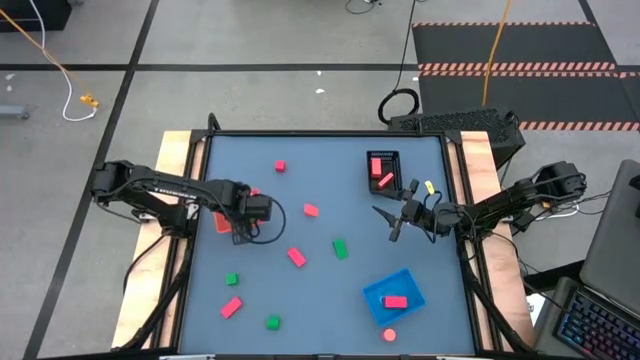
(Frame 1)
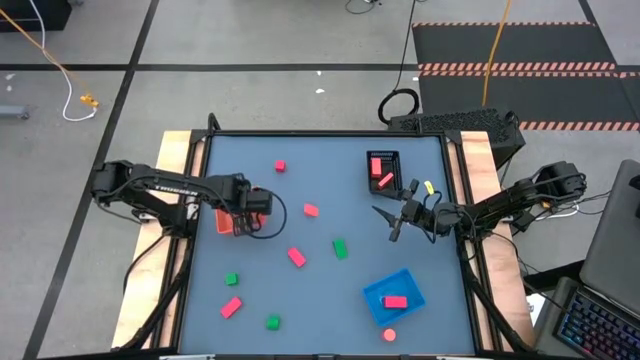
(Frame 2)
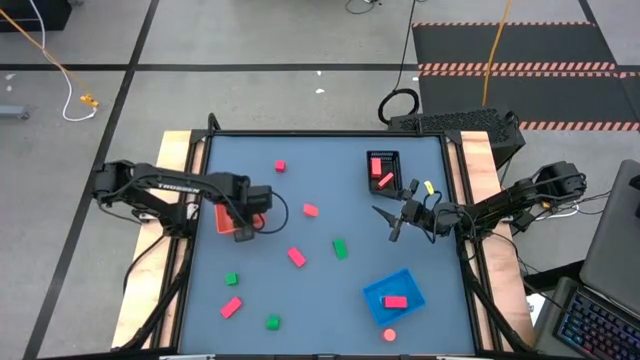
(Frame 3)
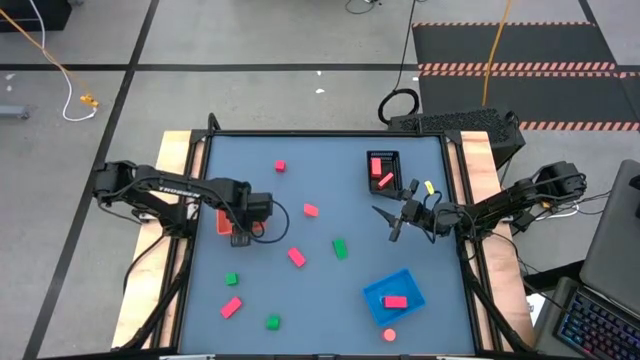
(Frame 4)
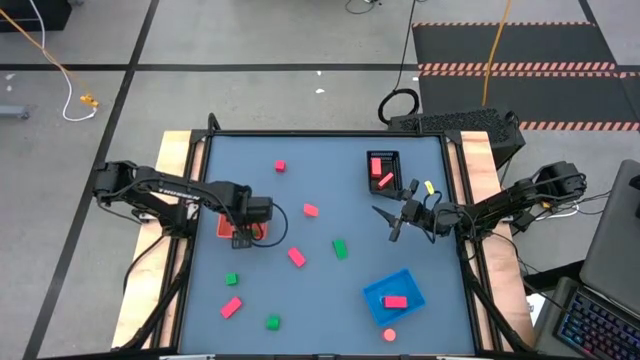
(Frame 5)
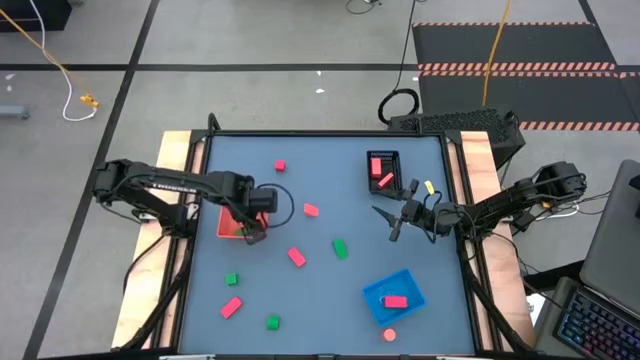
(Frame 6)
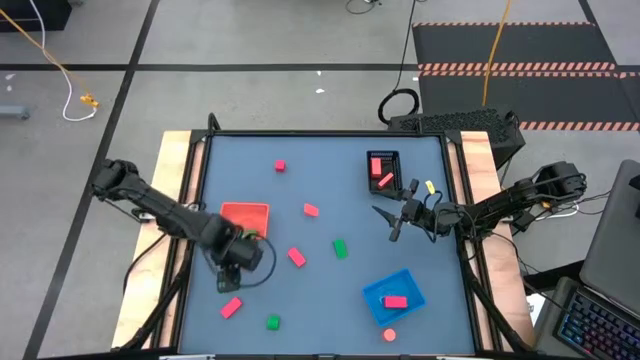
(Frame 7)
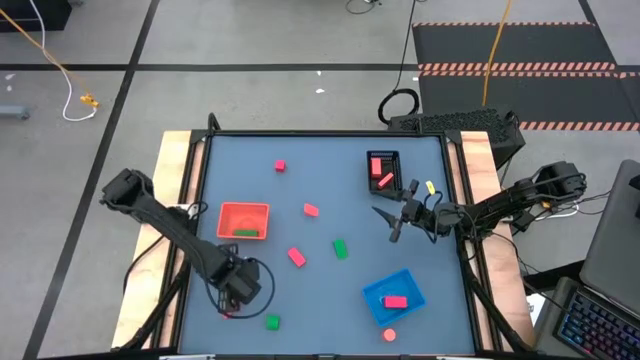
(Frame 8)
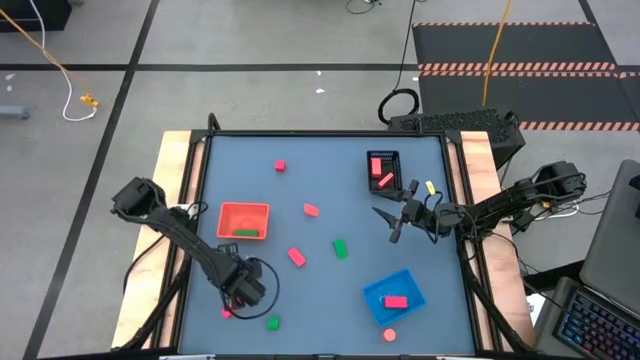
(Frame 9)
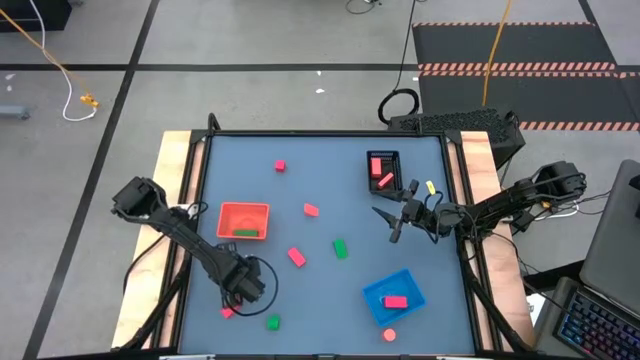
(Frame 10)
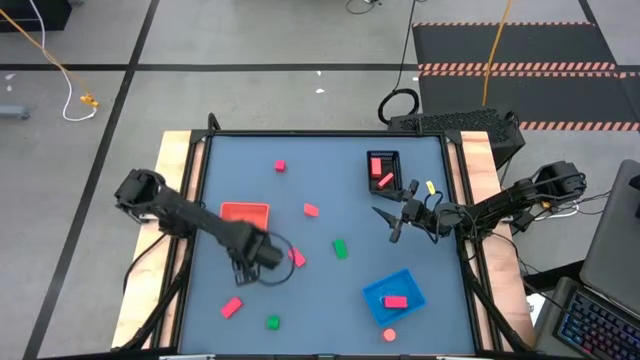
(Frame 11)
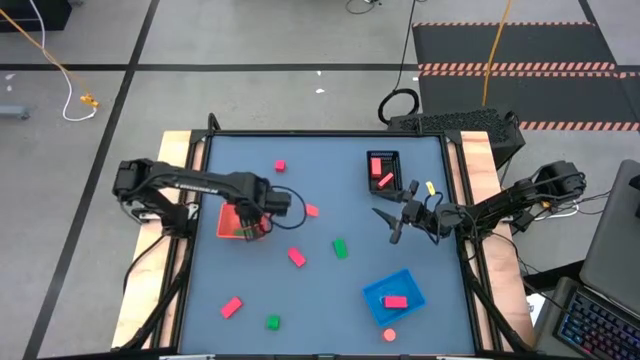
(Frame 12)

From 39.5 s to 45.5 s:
Task: Sort & place blocks by color
Put the green block into the orange bin

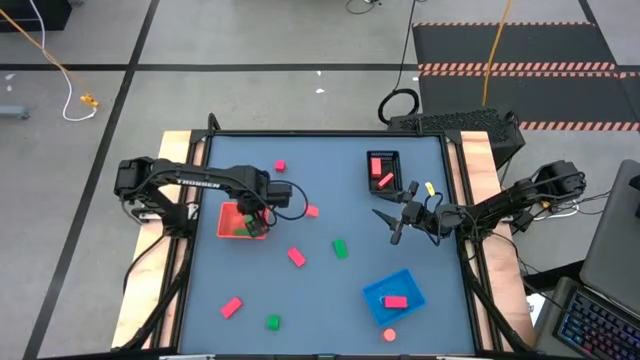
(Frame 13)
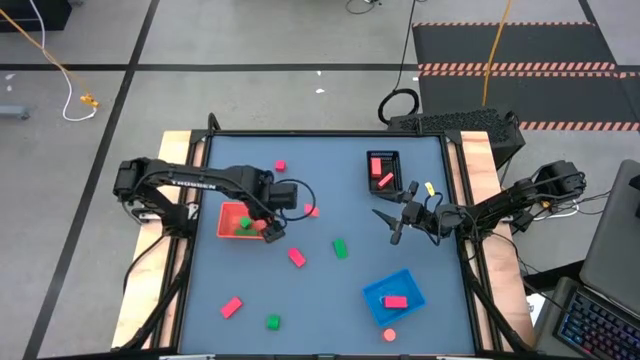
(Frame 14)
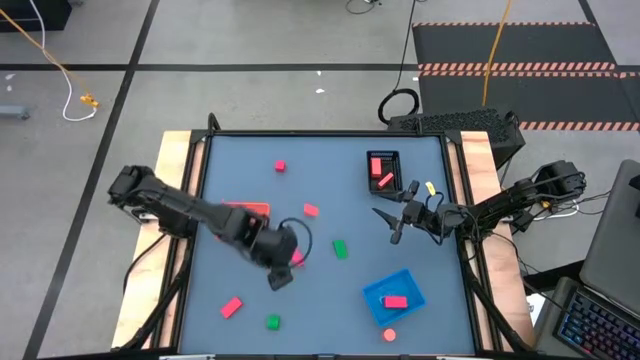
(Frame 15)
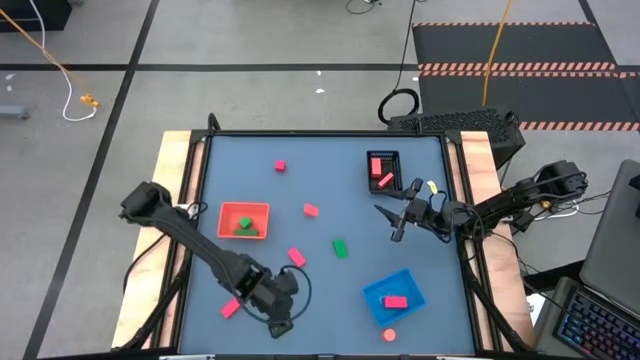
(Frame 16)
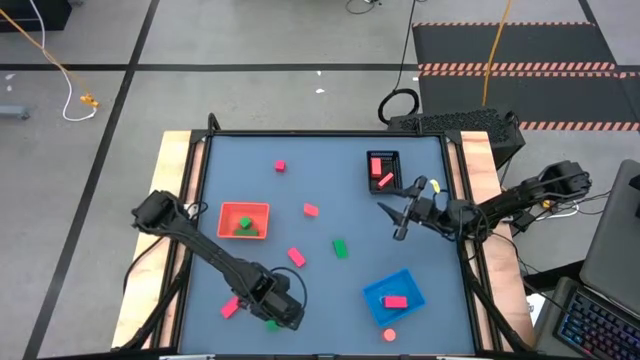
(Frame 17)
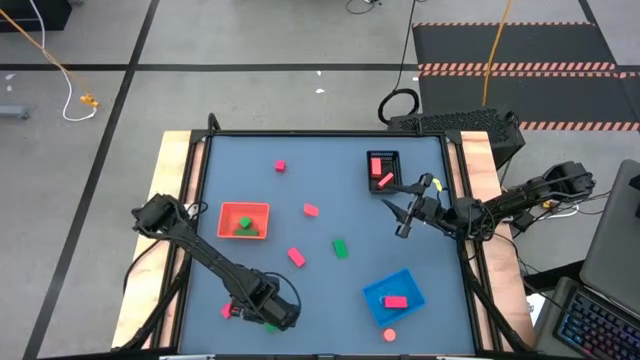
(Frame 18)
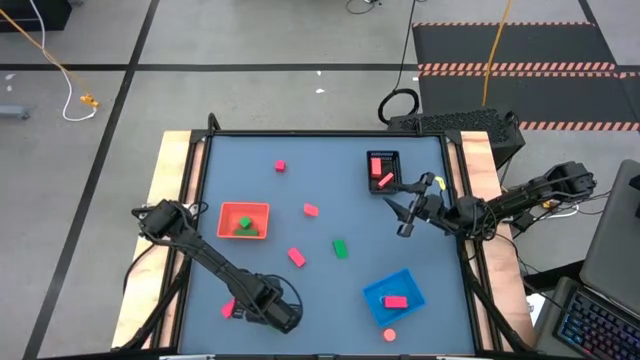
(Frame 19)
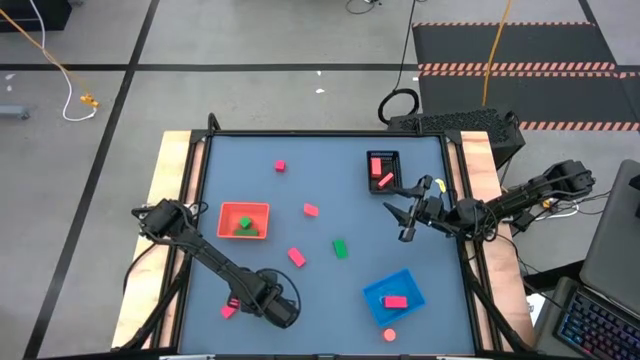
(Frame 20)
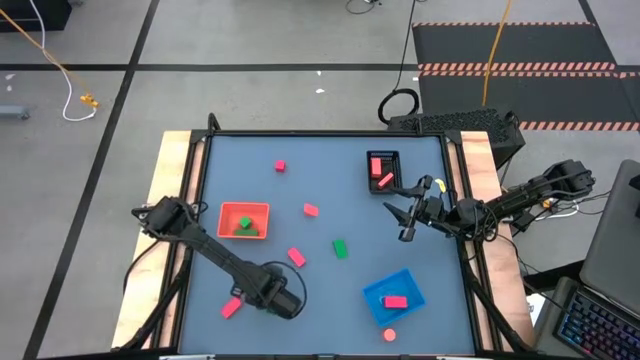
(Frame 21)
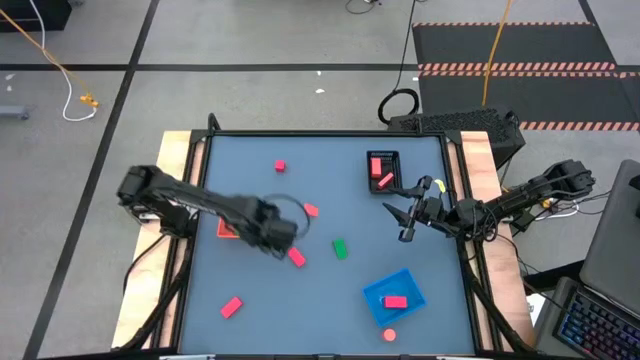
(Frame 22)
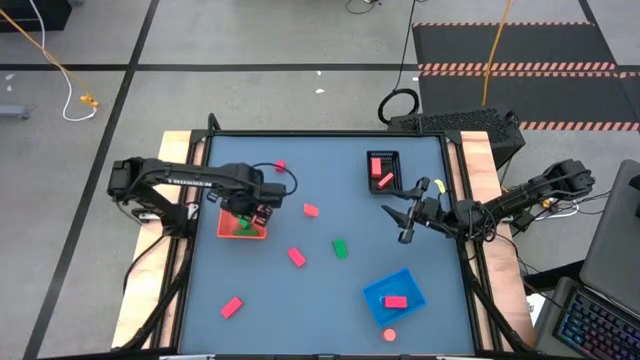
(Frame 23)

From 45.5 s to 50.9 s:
Put the green block into the orange bin

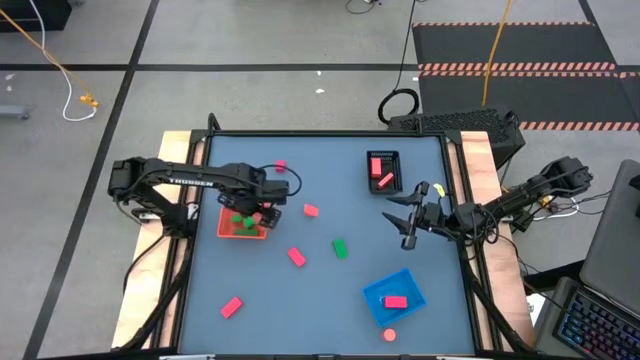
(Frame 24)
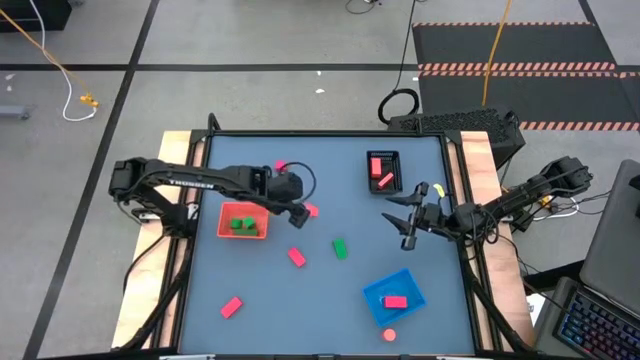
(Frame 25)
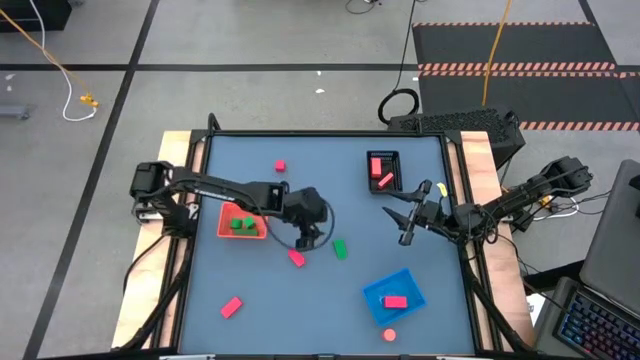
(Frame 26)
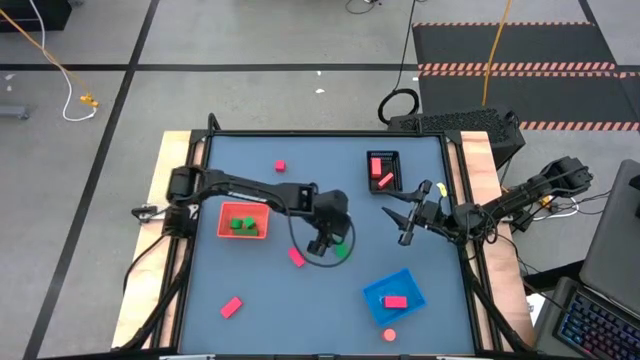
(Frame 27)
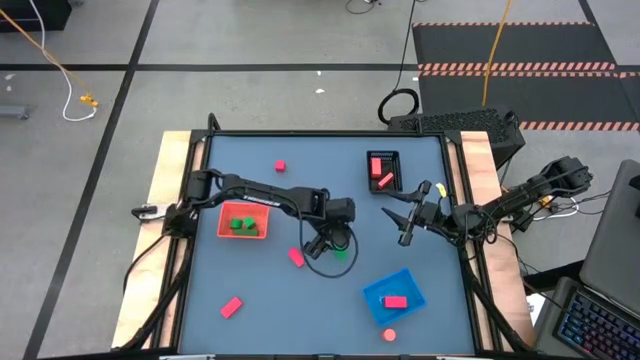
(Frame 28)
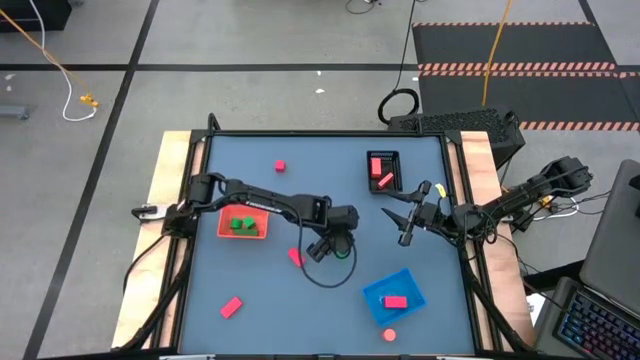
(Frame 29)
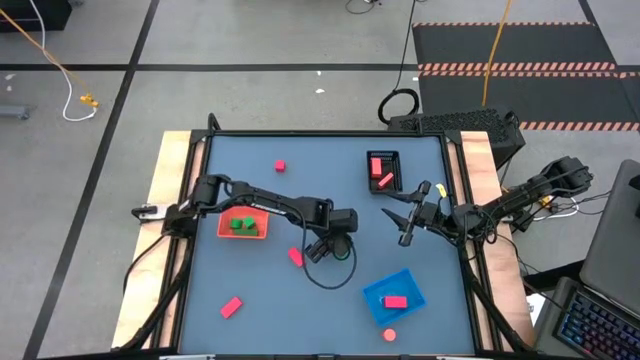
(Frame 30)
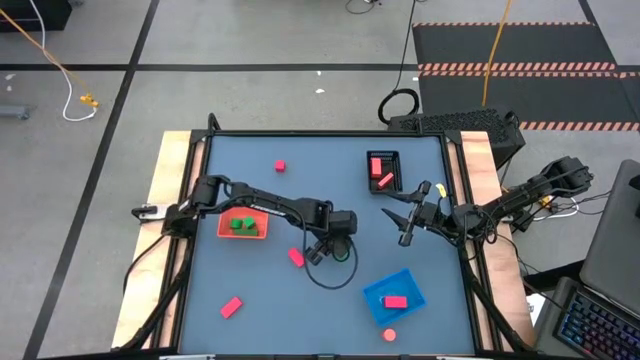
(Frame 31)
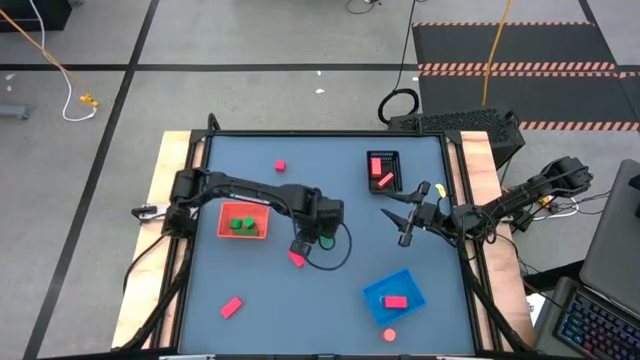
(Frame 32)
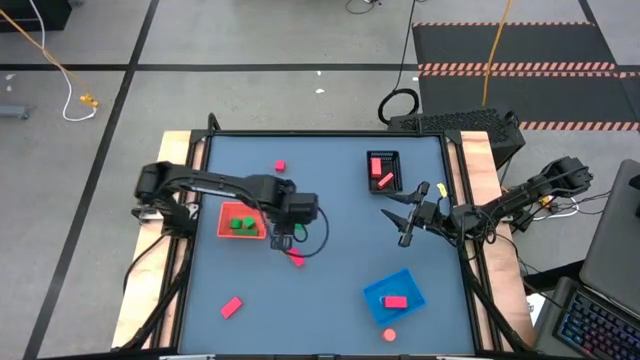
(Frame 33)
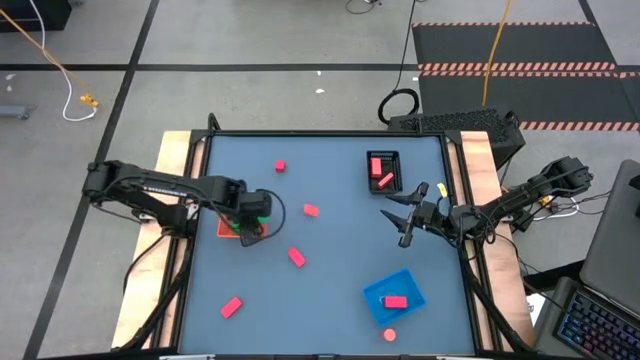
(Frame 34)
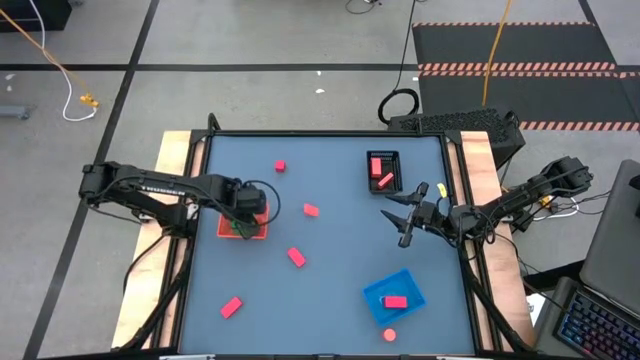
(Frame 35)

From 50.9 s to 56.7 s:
Put the green block into the orange bin

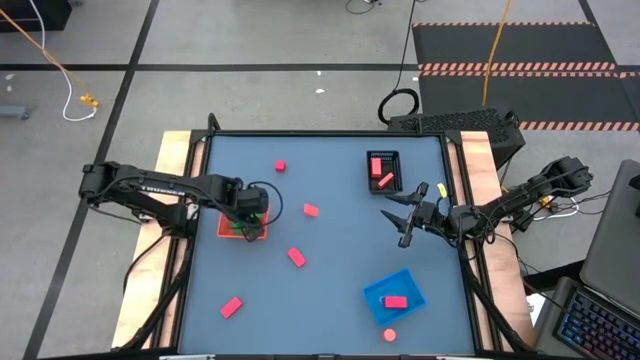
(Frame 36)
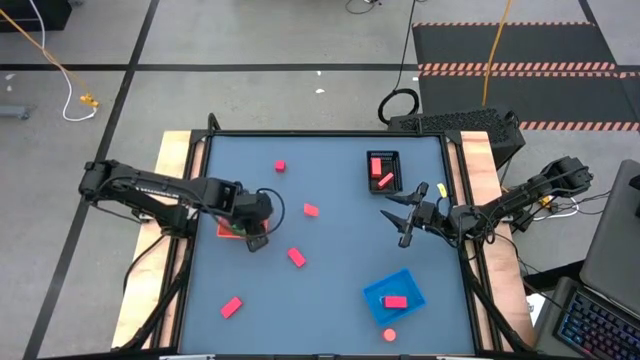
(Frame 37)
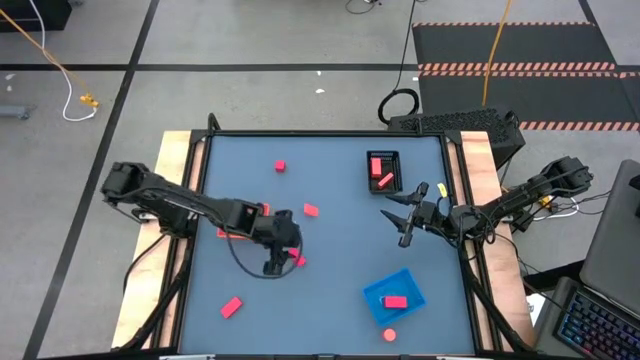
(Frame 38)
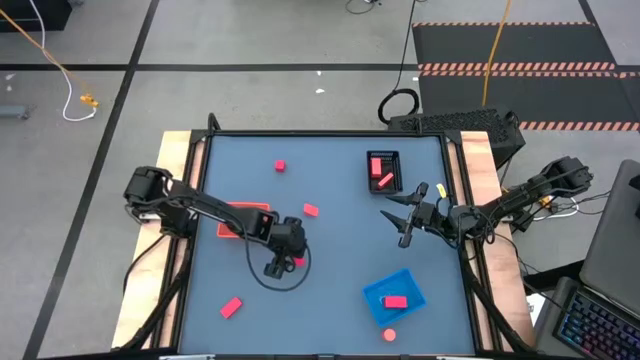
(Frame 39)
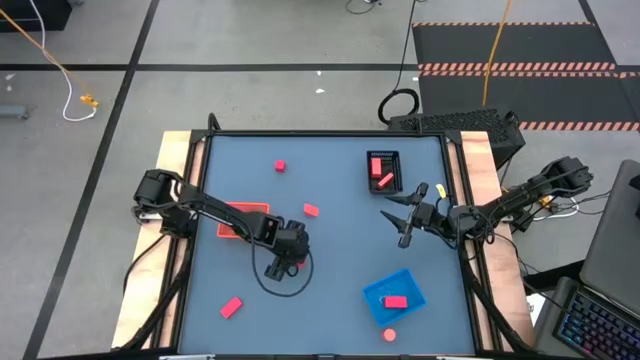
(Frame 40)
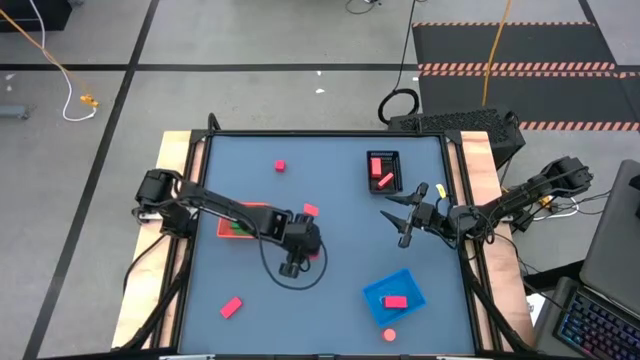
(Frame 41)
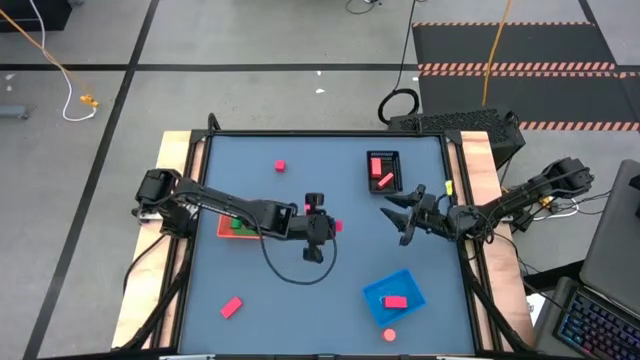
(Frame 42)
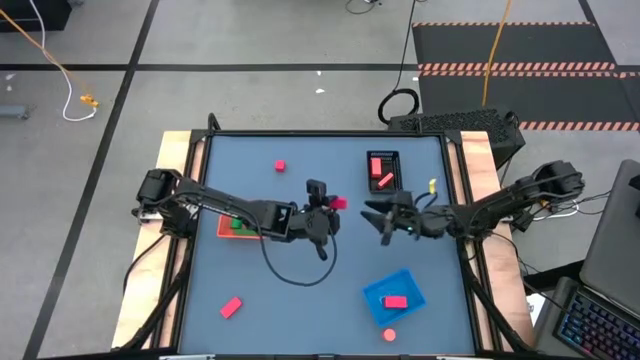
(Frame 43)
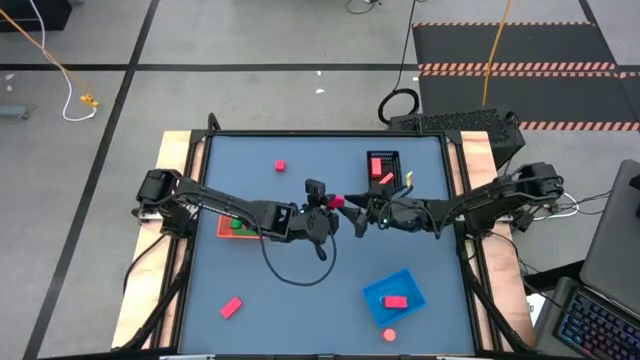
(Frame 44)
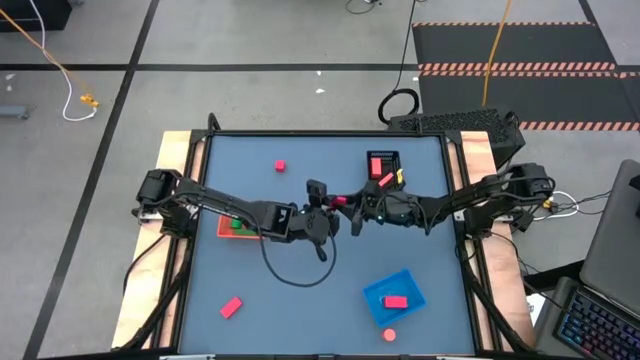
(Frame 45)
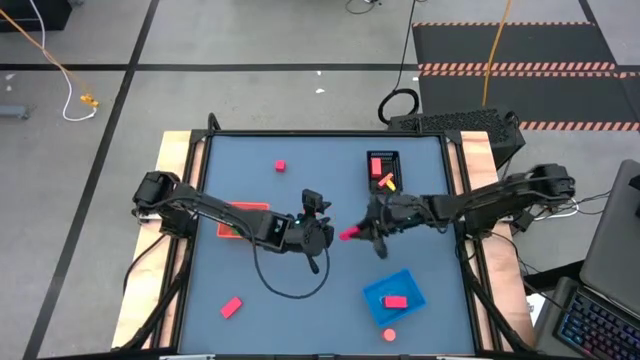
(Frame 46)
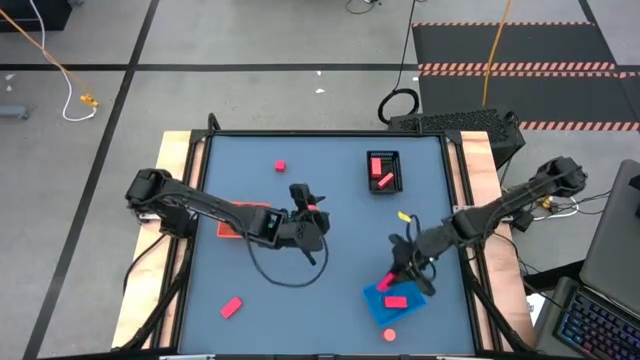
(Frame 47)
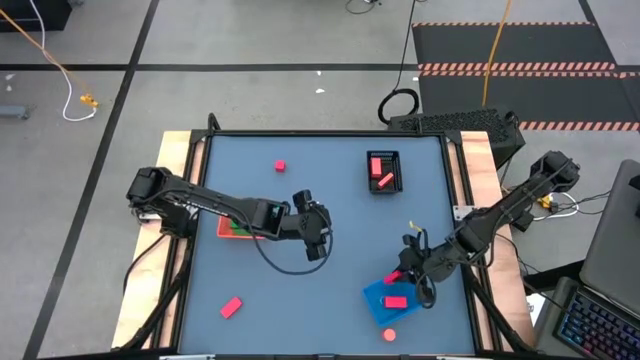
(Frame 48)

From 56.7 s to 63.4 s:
Put the red block into the blue bin
